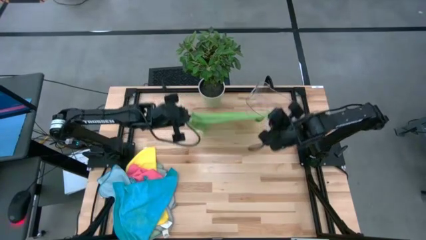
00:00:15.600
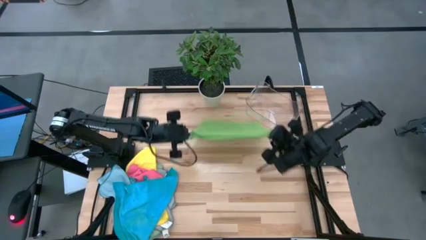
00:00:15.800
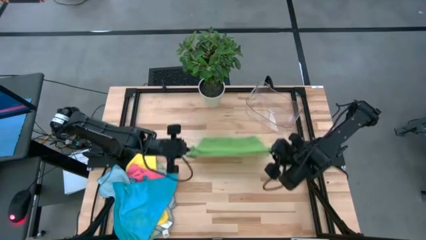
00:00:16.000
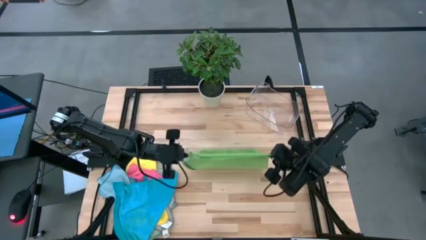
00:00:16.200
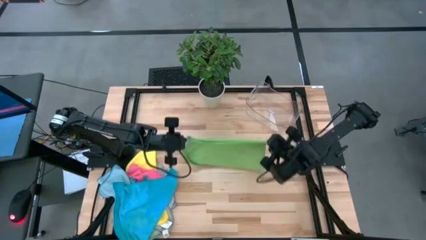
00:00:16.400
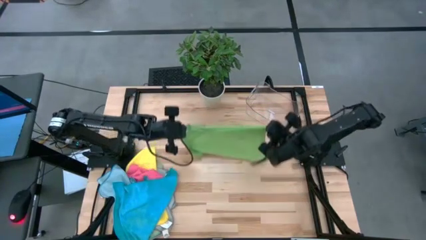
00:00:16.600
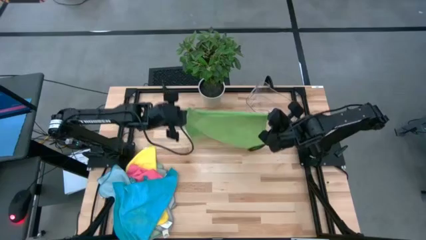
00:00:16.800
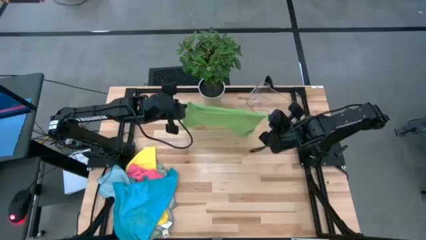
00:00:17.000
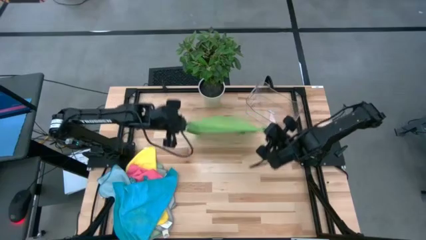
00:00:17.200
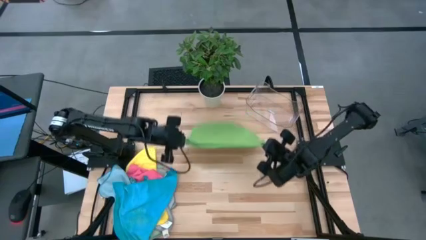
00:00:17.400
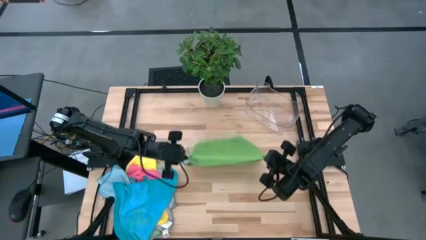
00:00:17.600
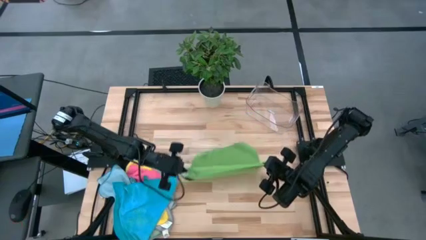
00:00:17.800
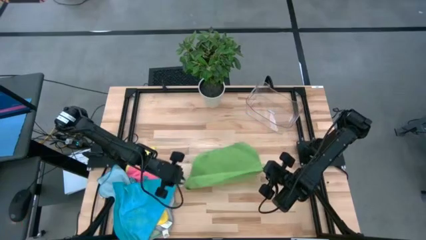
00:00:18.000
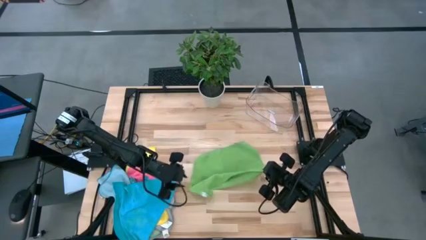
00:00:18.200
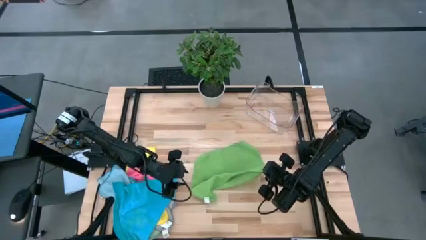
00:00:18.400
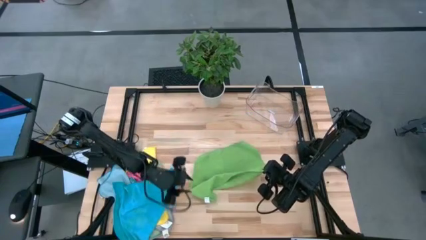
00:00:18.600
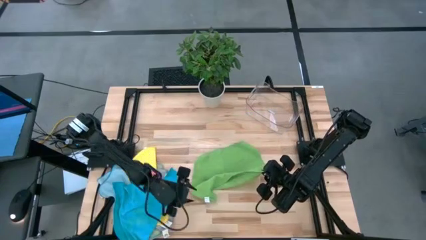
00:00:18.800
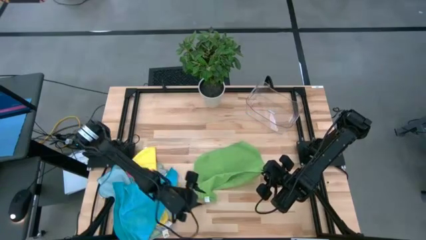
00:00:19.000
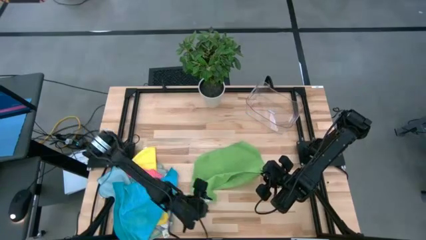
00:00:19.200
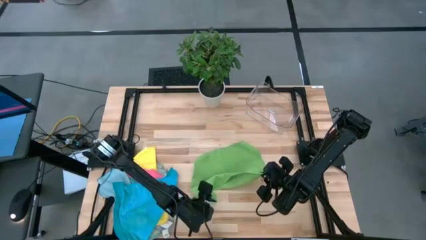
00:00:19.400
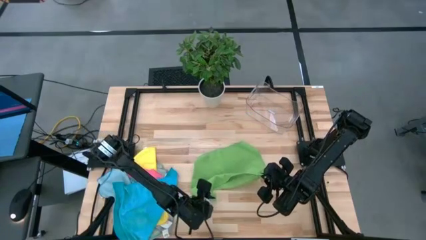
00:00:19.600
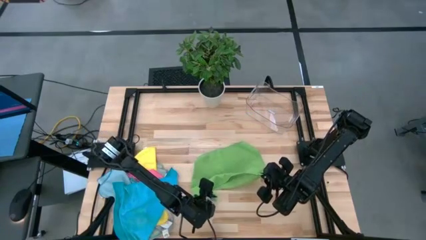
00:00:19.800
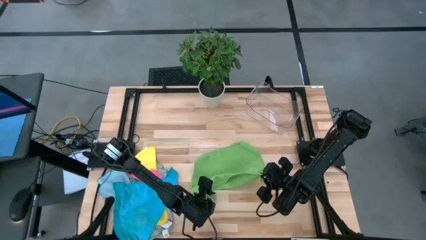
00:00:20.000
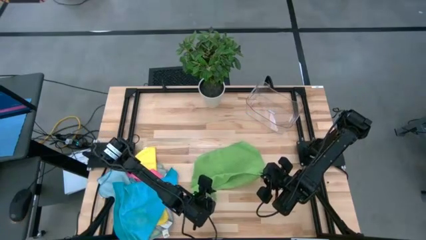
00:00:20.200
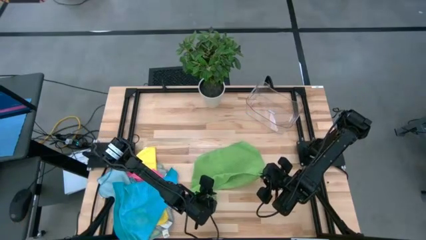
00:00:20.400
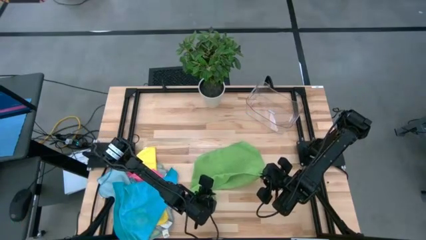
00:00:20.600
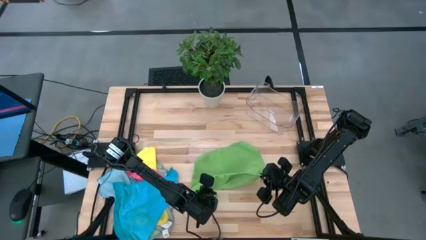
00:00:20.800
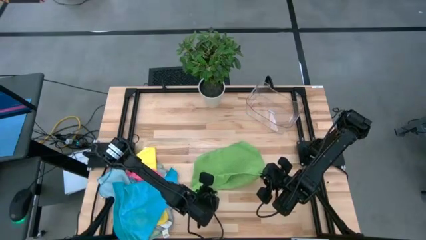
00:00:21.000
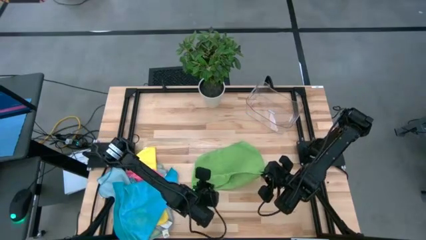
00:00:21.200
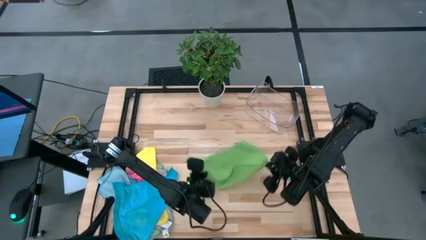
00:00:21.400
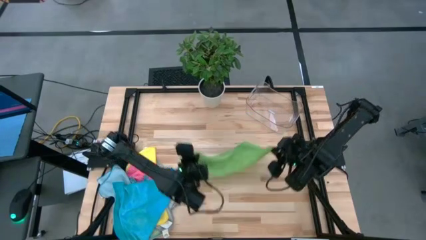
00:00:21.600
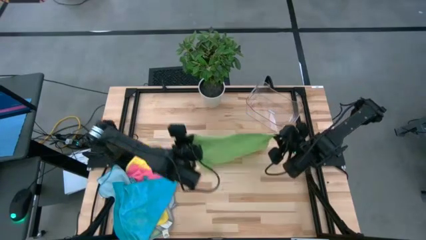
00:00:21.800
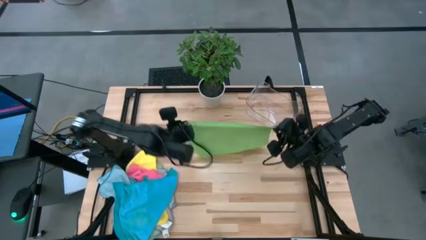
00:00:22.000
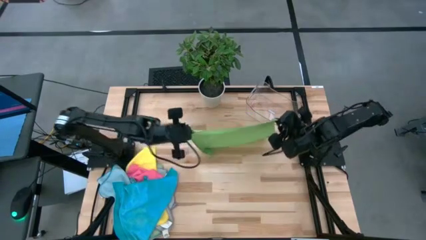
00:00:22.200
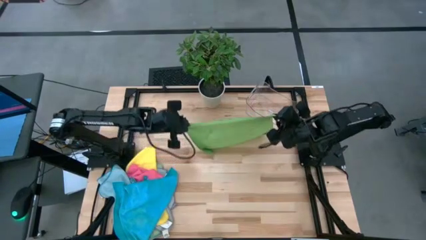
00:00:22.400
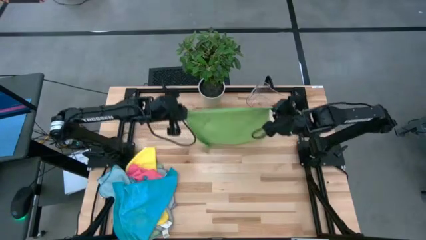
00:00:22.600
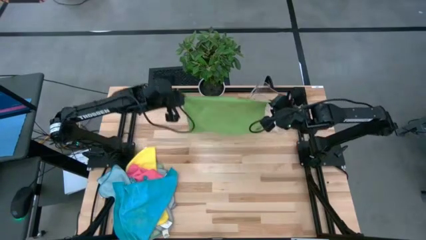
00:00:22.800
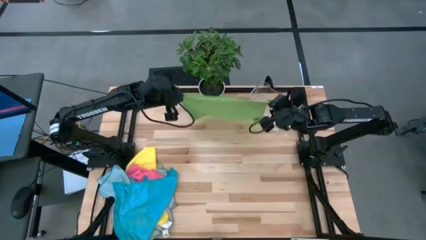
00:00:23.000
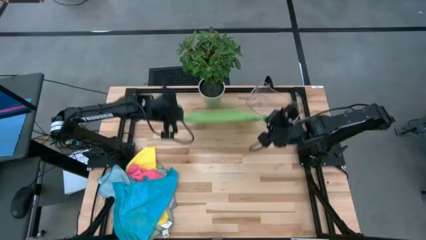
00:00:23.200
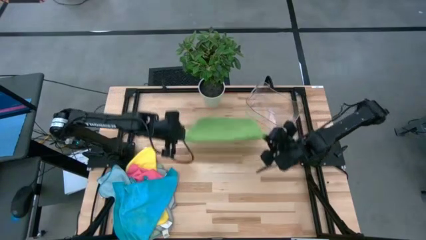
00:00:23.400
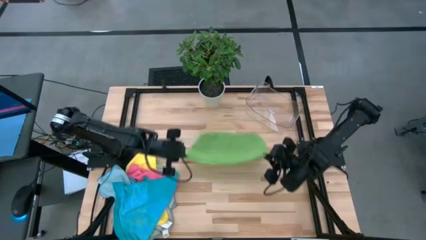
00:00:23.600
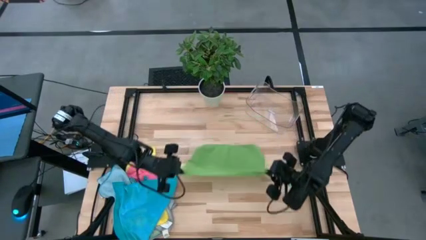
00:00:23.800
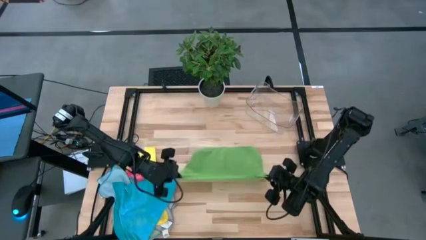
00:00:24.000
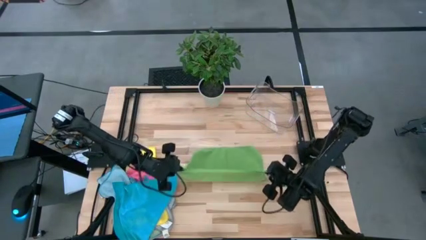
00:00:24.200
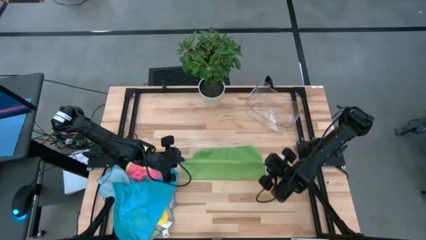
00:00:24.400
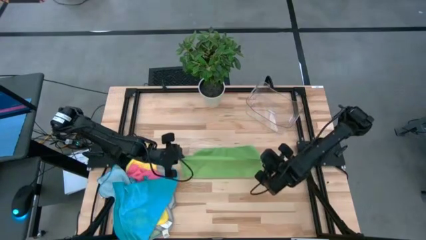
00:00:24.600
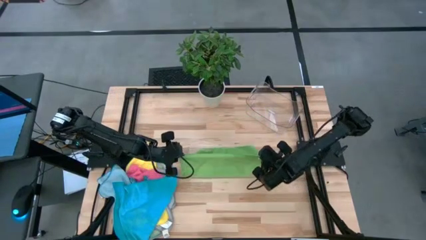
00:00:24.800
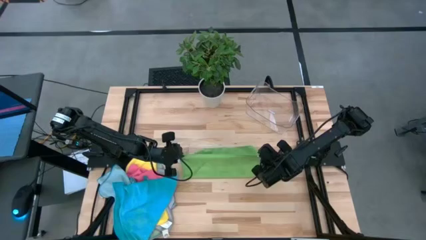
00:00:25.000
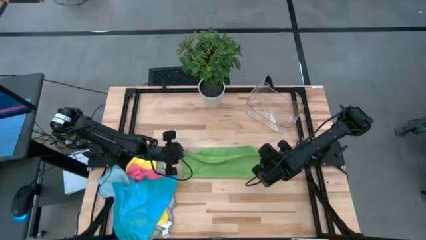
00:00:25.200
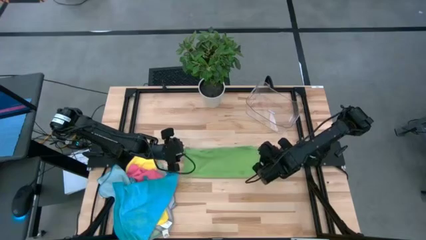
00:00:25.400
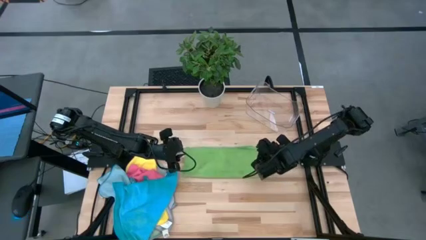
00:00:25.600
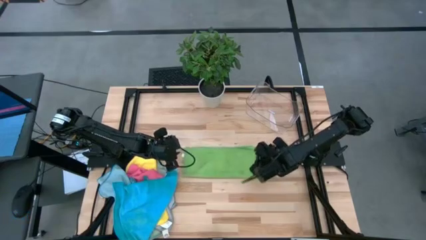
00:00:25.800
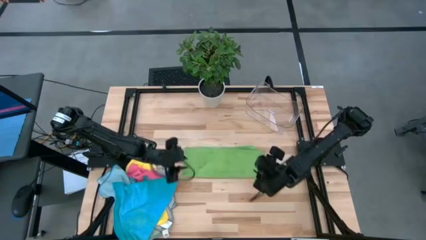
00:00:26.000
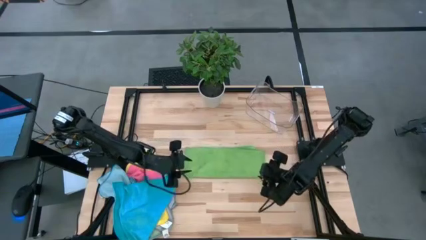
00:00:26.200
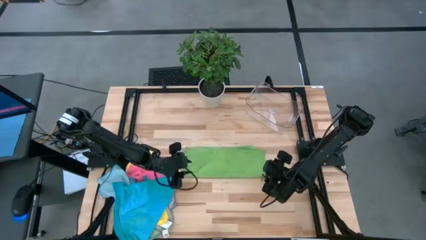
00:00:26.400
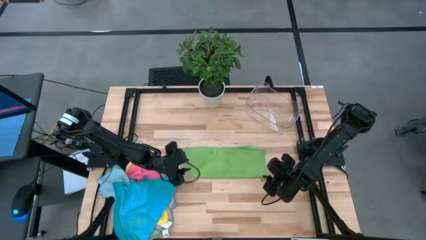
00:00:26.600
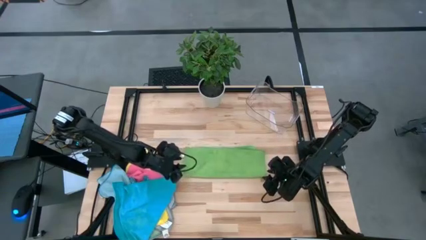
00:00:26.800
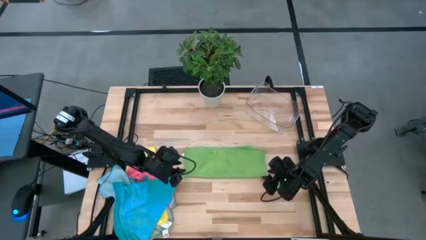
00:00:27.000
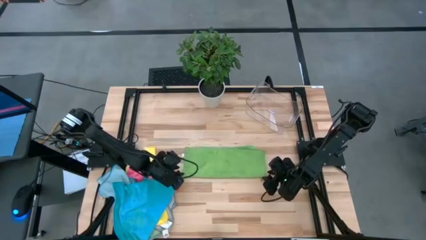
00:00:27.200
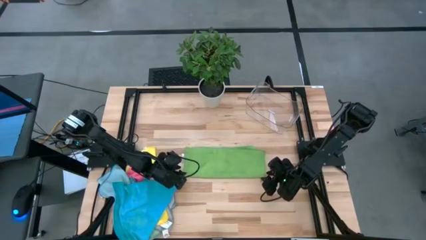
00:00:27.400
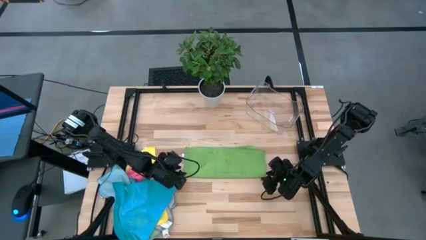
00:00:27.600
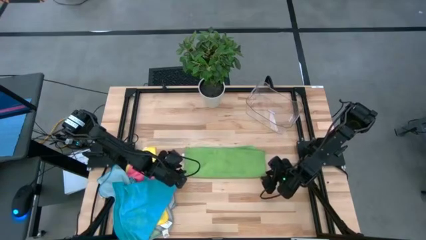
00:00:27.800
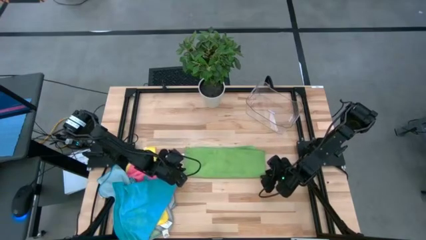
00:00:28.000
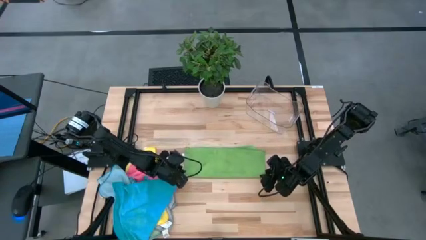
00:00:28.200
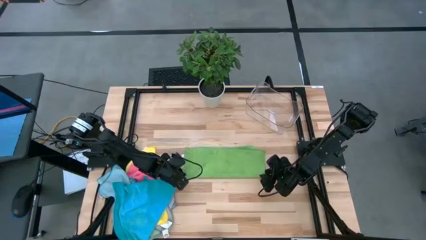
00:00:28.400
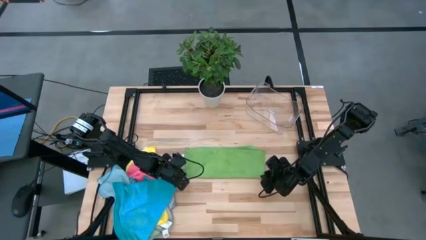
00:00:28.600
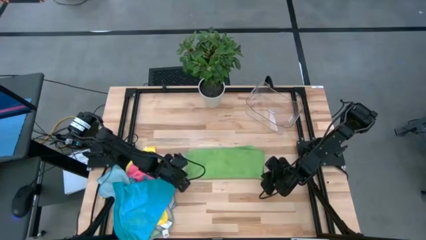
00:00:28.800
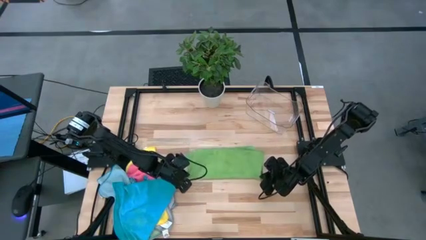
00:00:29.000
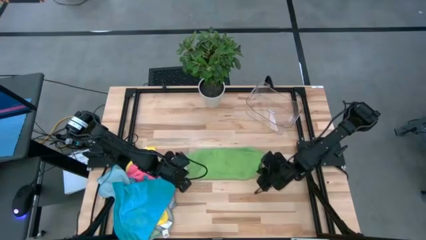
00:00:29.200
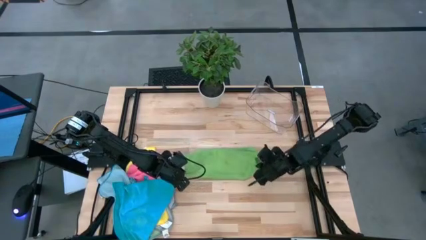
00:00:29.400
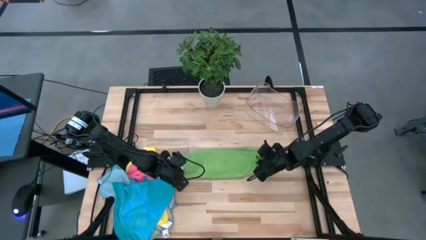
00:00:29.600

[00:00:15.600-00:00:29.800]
Task: Fold microfiber towels
Fold the green microfiber towel

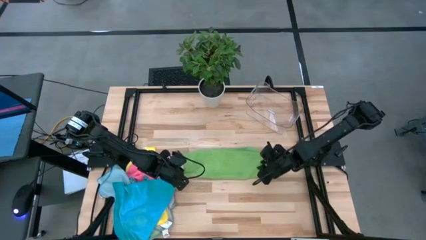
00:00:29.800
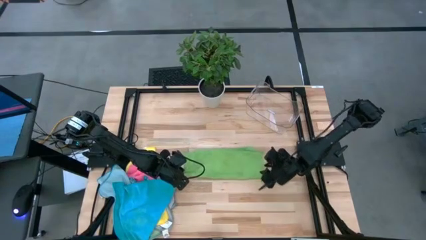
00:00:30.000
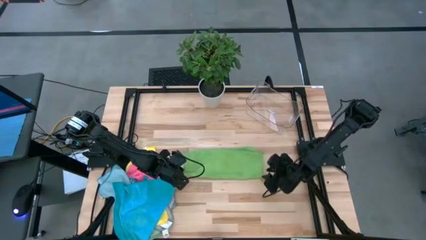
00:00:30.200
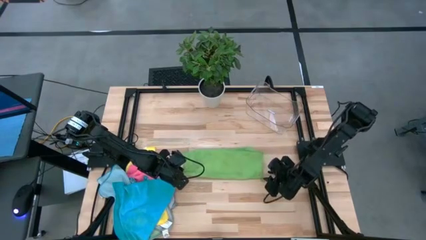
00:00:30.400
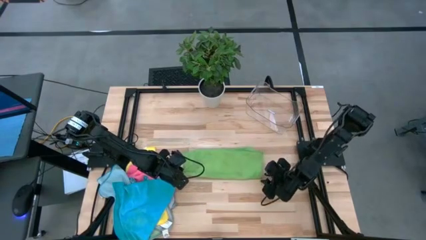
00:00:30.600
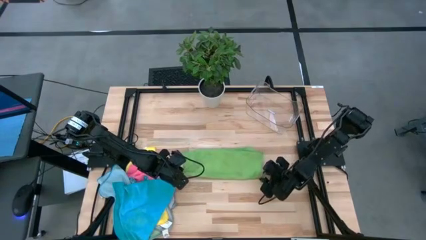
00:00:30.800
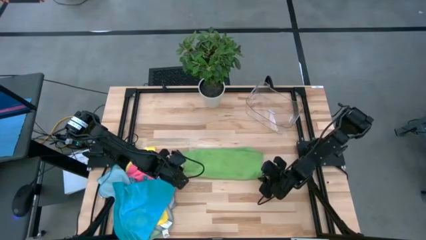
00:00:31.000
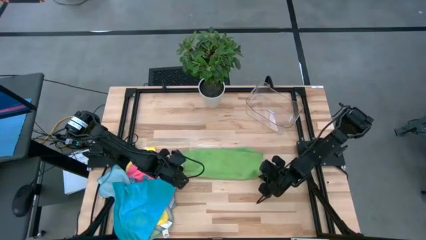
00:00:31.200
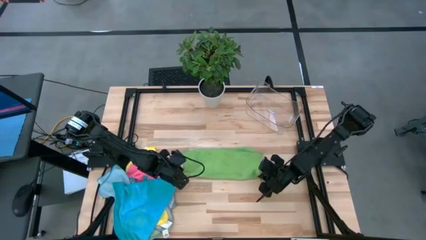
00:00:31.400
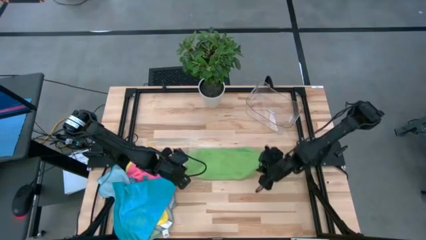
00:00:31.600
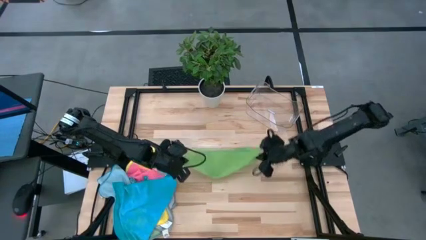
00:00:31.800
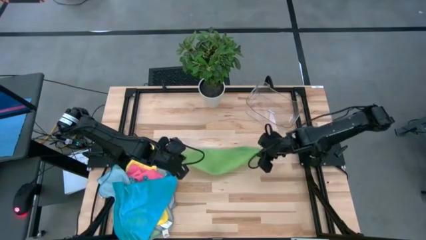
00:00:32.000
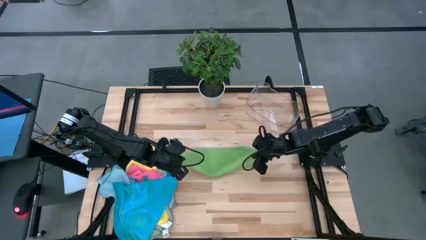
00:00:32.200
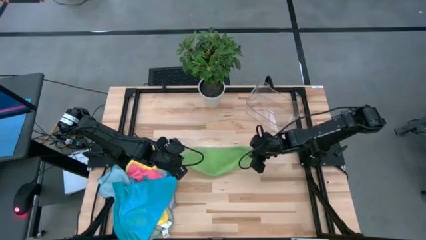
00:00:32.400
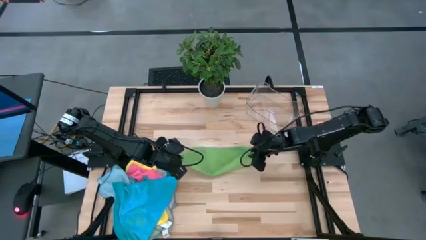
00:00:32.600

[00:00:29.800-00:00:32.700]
Fold the green microfiber towel
